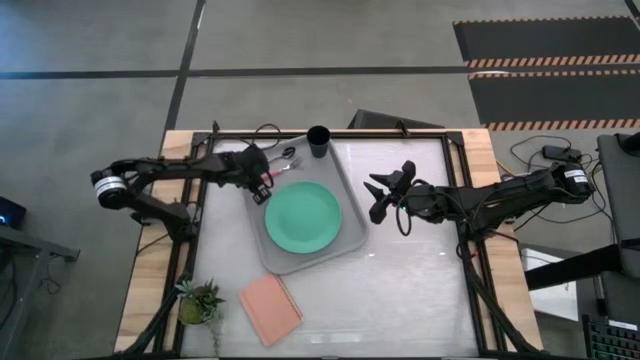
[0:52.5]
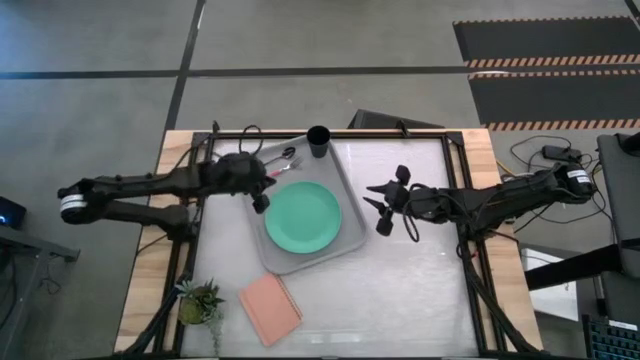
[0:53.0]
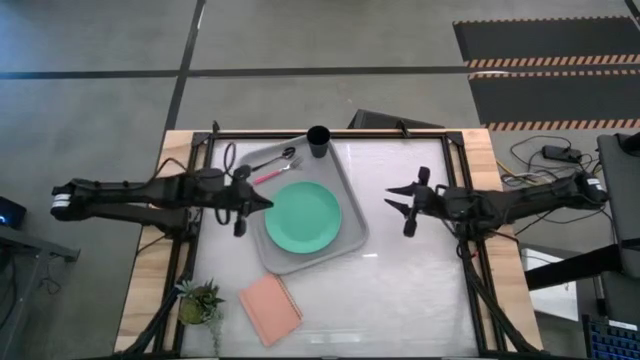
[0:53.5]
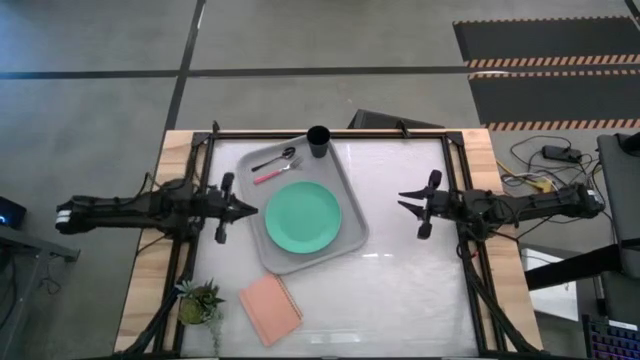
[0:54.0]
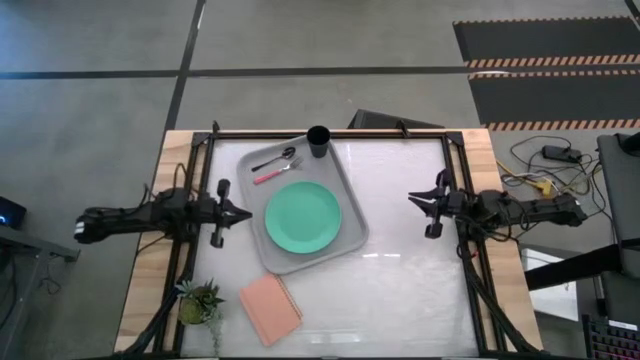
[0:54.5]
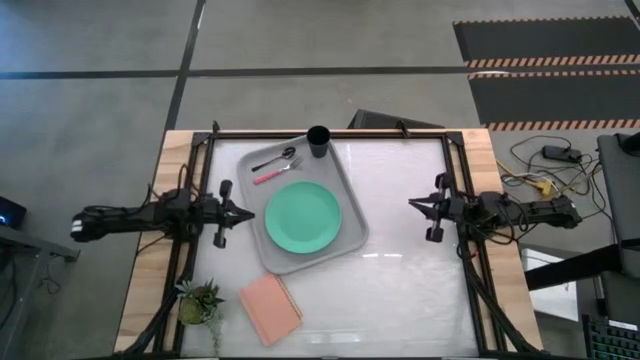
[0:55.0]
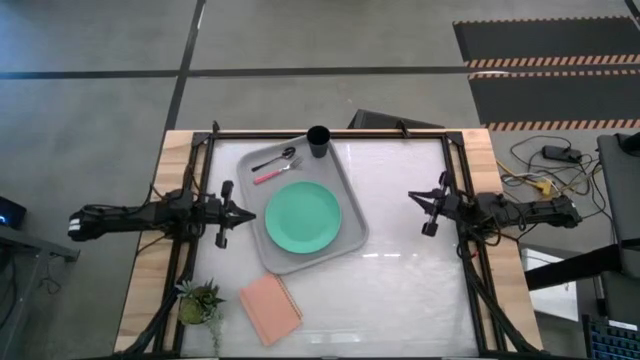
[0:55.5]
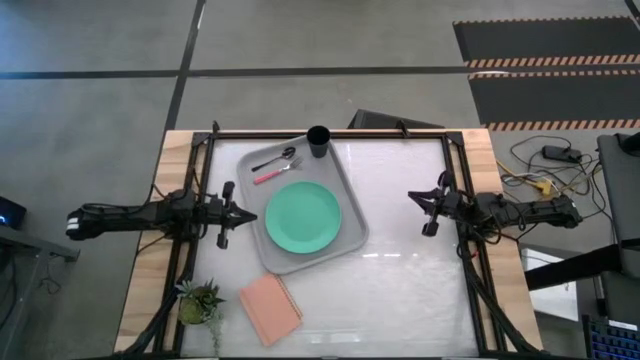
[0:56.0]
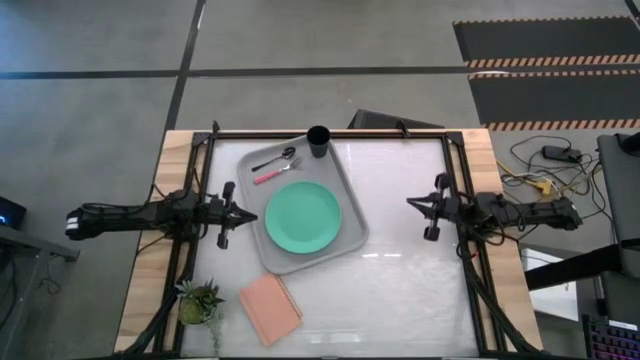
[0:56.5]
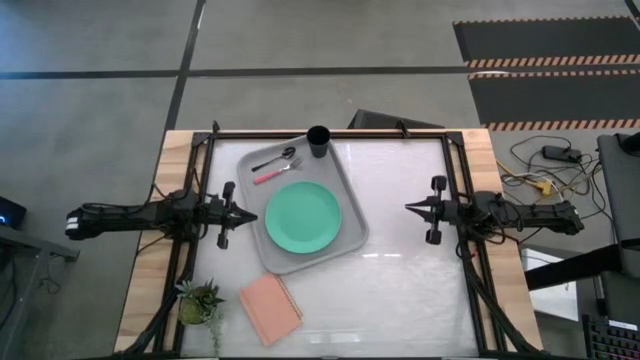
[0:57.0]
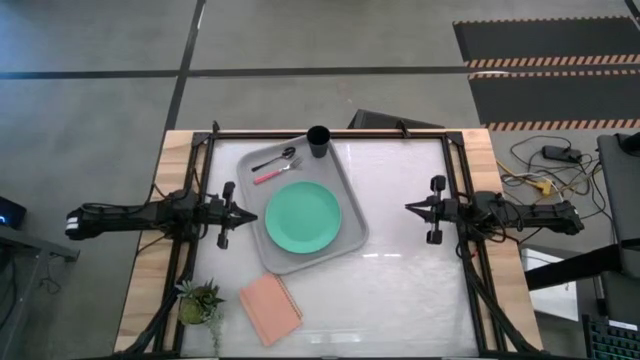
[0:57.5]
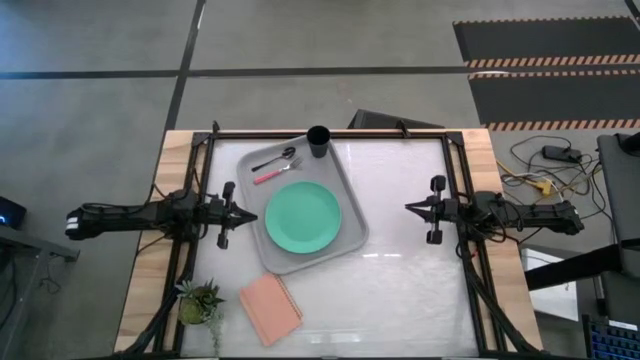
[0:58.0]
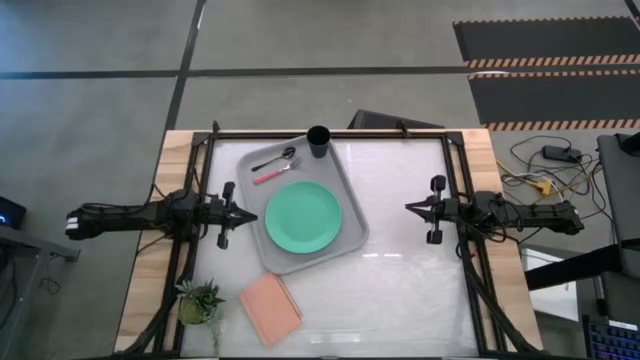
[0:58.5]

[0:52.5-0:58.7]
Task: Pick and place plate/cup/fork/spoon on tray
Return to Home Position

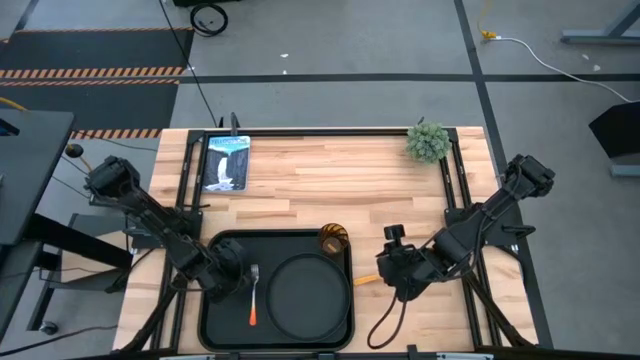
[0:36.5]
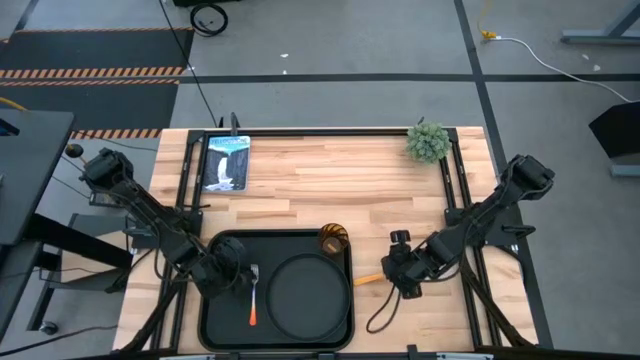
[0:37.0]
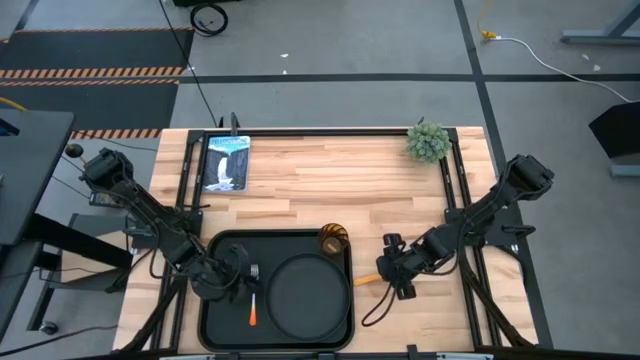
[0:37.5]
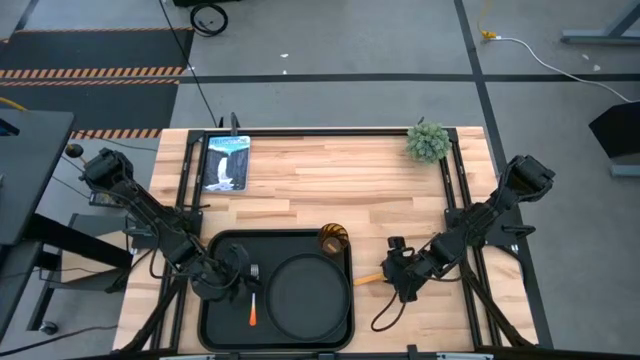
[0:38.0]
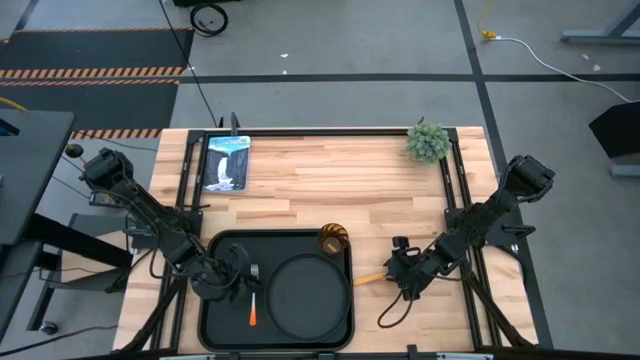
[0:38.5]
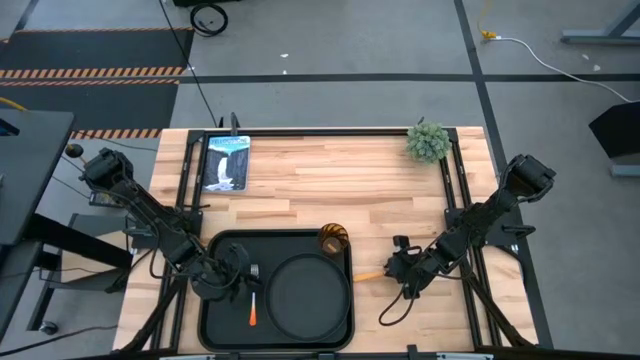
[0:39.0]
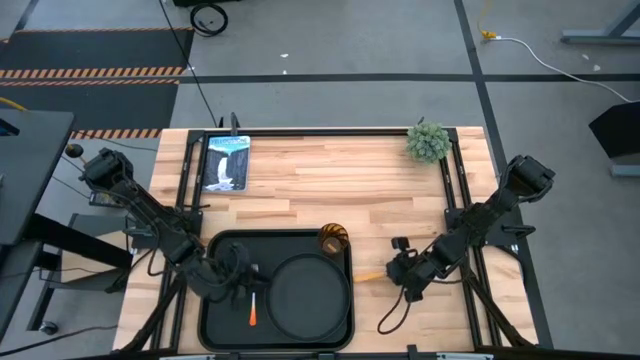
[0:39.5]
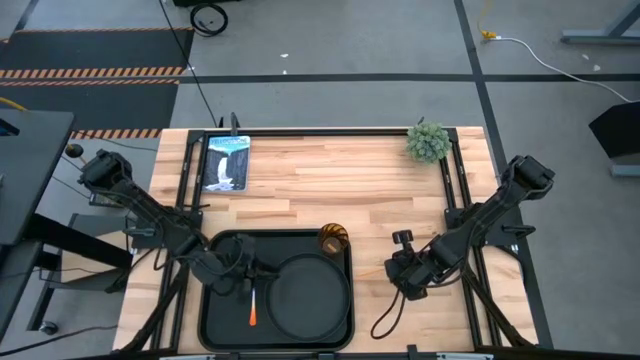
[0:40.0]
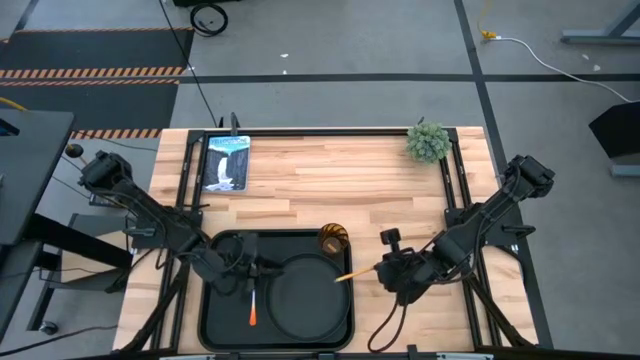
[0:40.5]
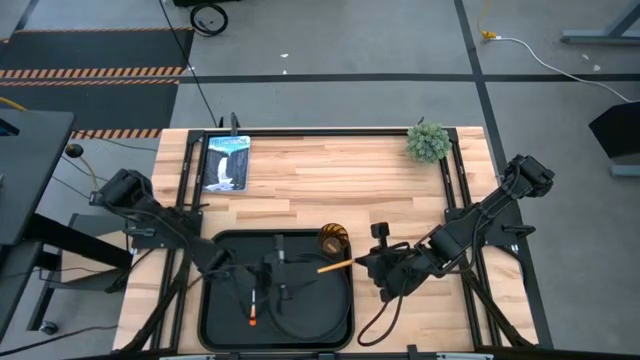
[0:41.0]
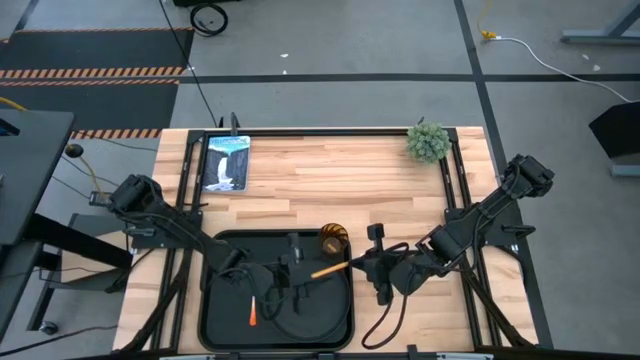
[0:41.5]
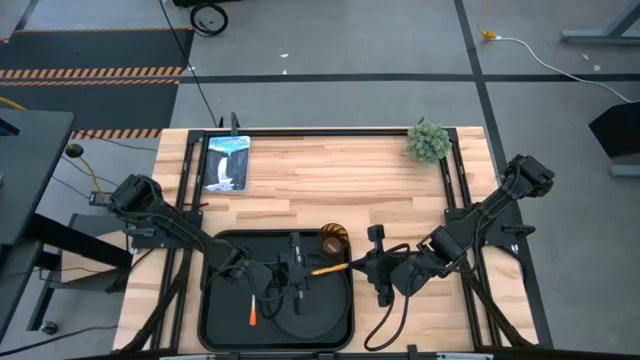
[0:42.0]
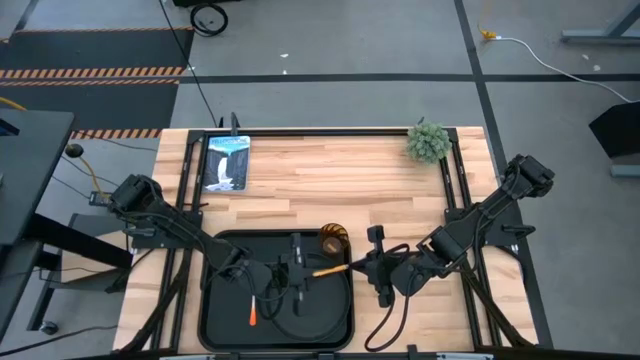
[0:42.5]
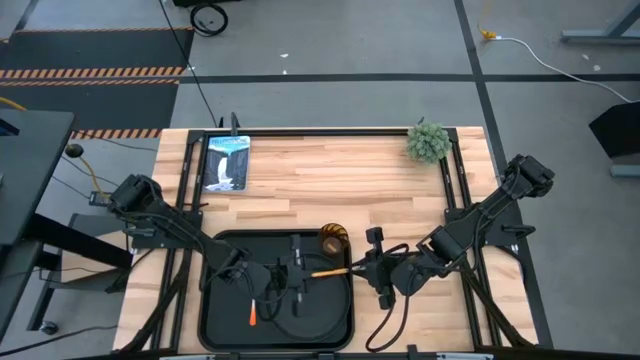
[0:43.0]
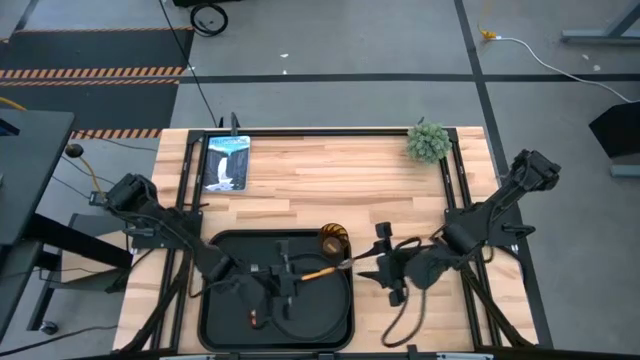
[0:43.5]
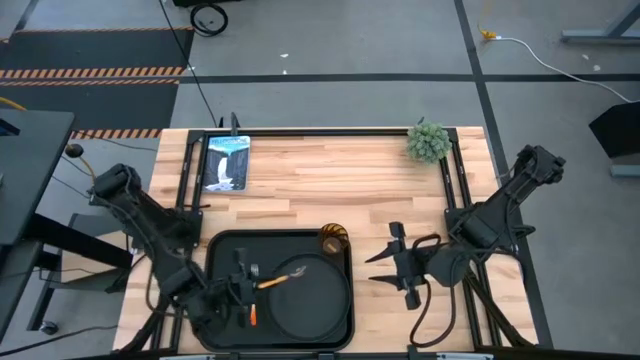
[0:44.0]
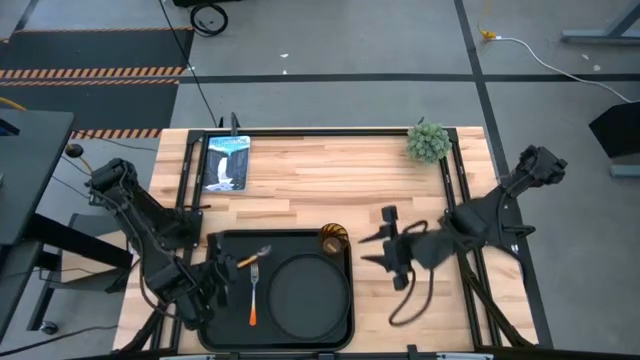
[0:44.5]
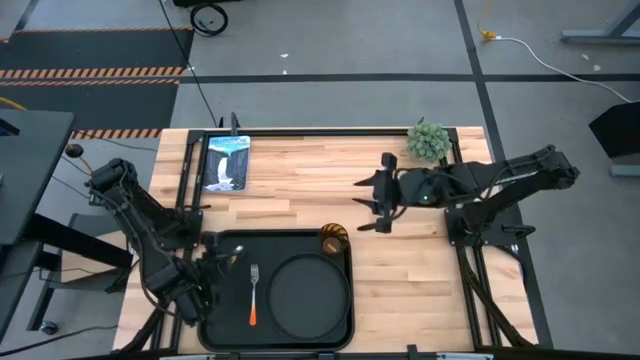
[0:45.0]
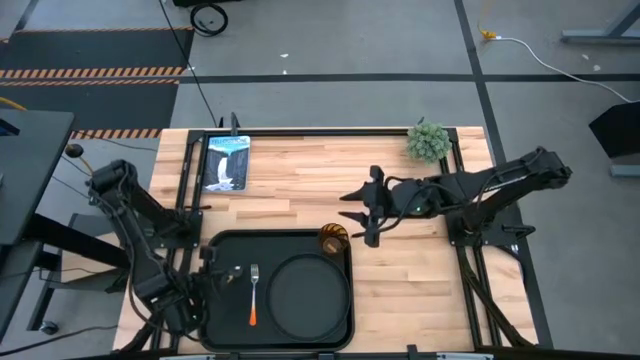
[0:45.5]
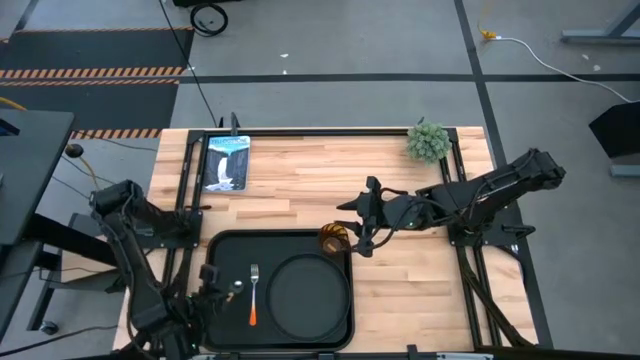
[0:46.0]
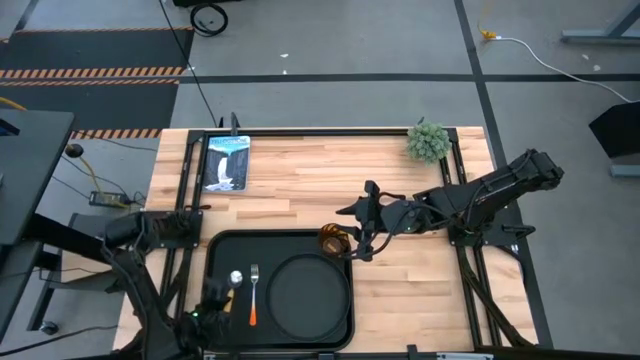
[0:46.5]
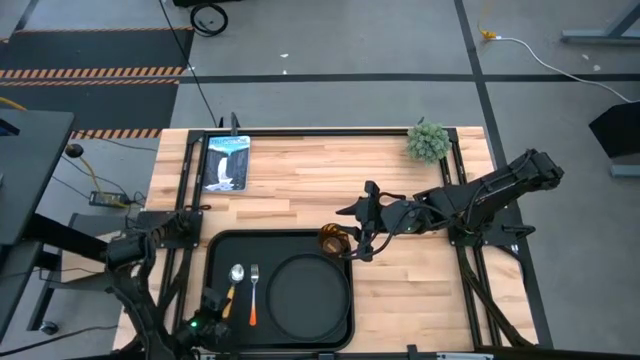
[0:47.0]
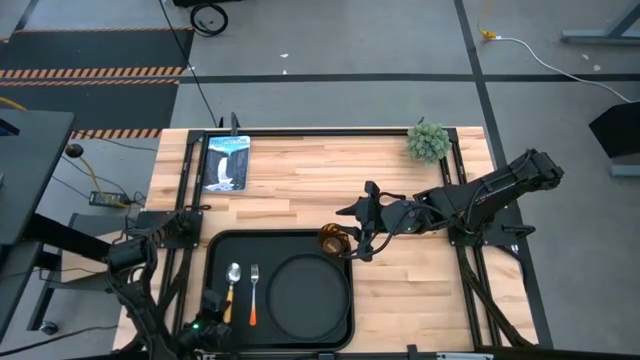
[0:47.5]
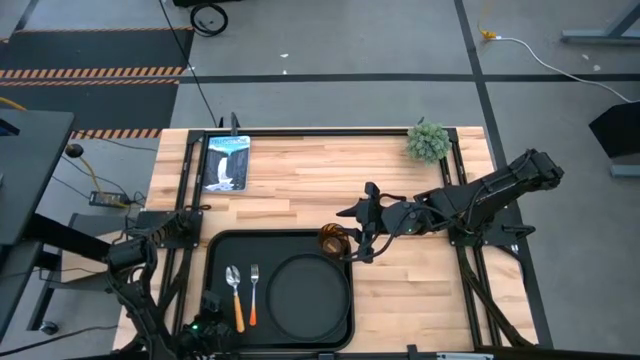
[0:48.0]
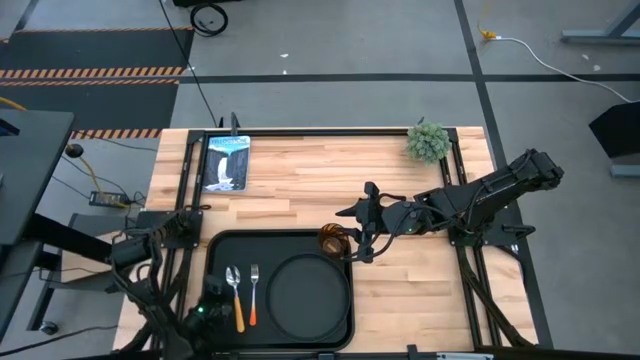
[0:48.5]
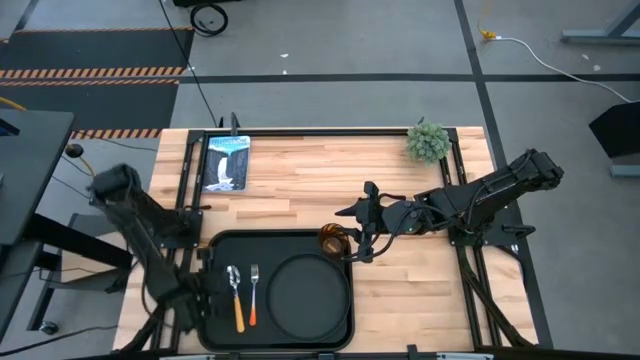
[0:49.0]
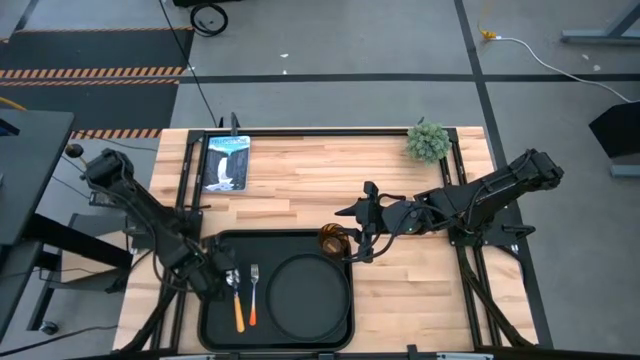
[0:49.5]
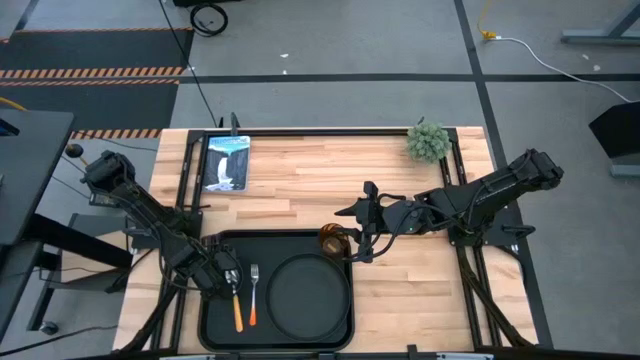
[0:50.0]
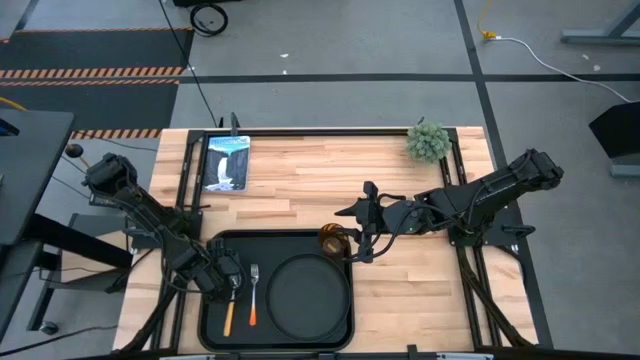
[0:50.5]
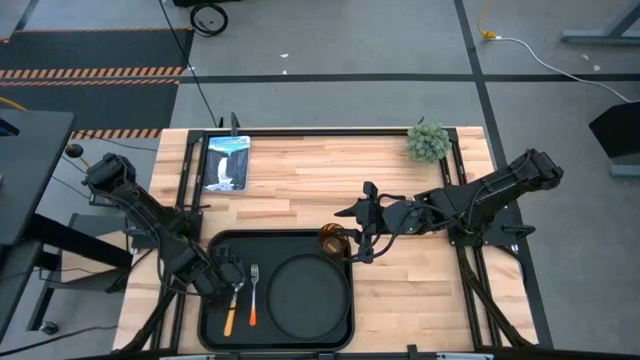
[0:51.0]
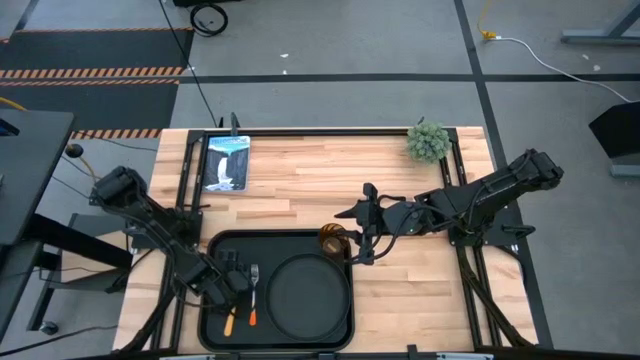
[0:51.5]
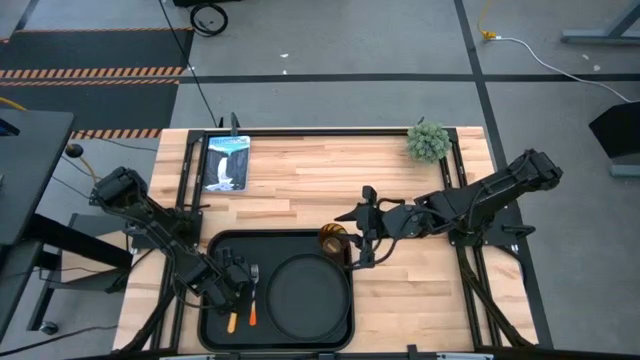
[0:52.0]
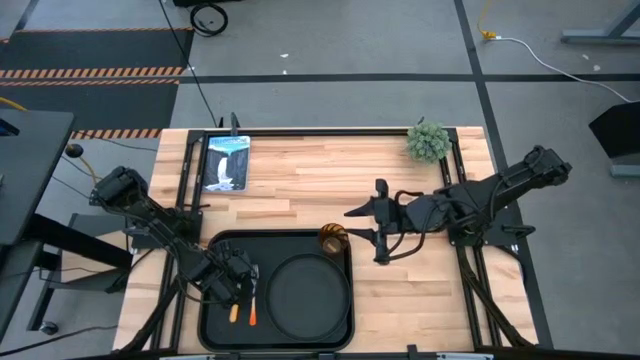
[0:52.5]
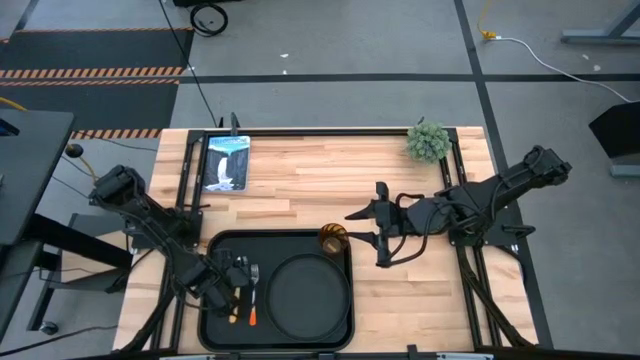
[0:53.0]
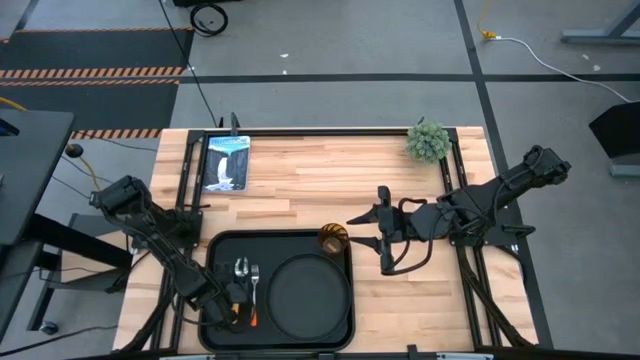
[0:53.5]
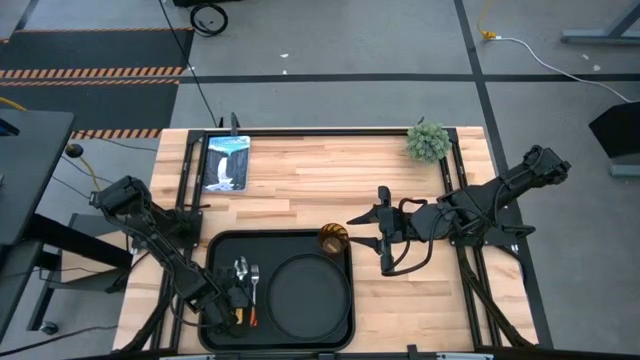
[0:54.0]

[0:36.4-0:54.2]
Task: Pick and place plate/cup/fork/spoon on tray
Put the yellow spoon on the black serving tray
